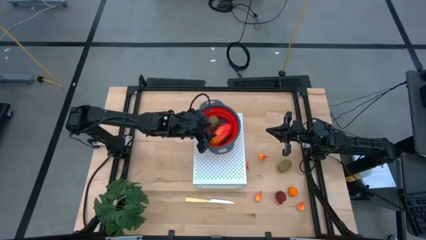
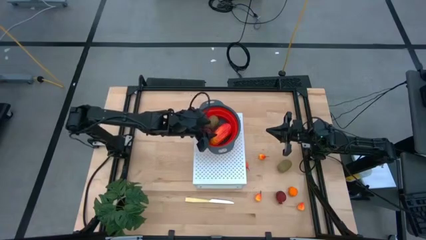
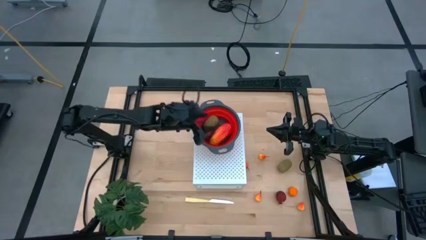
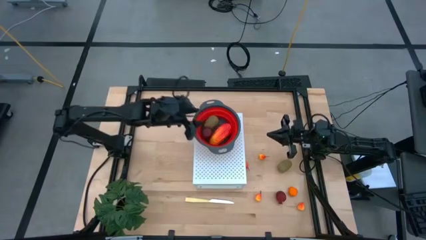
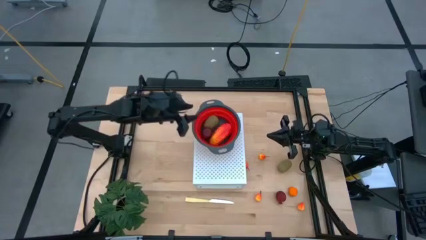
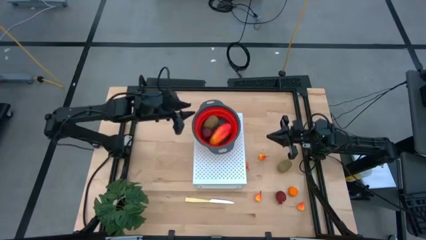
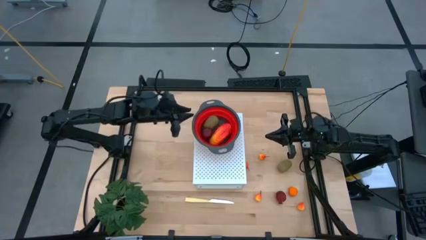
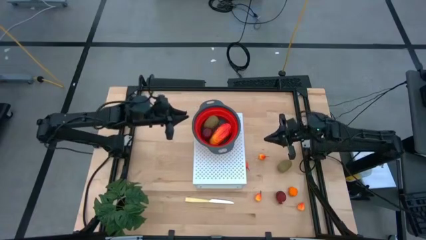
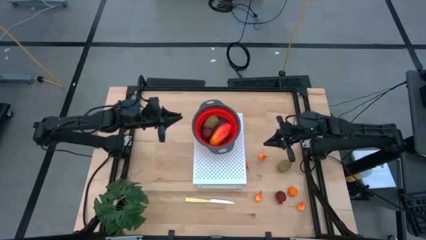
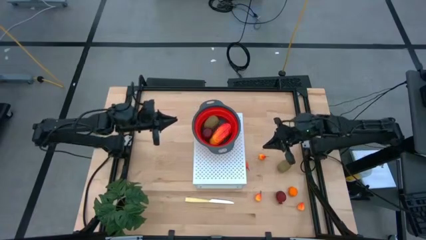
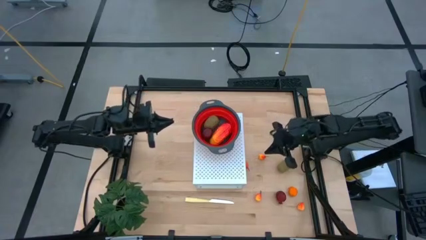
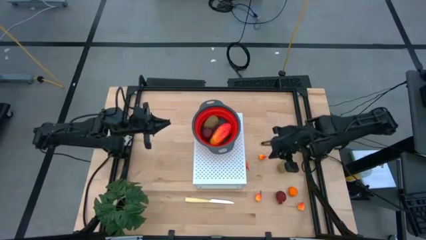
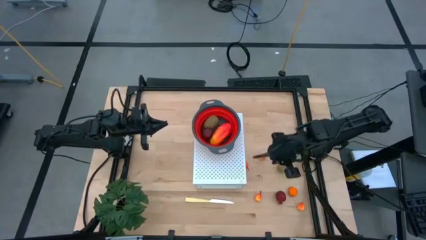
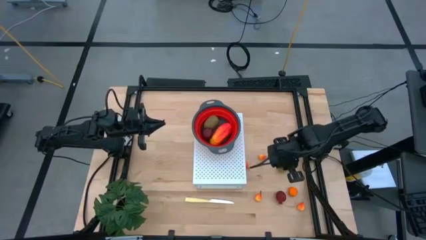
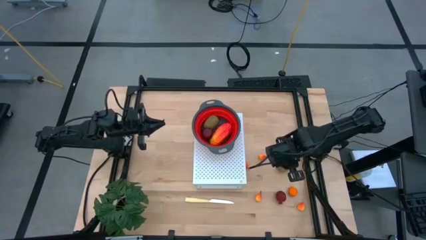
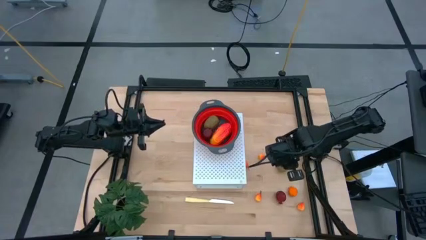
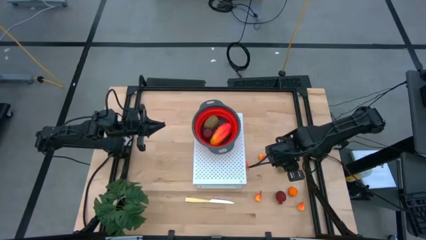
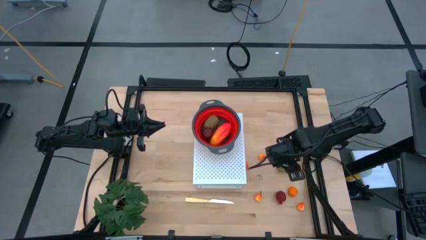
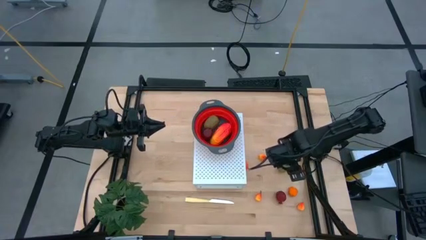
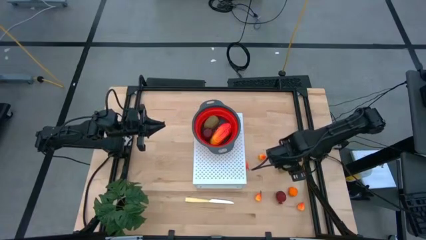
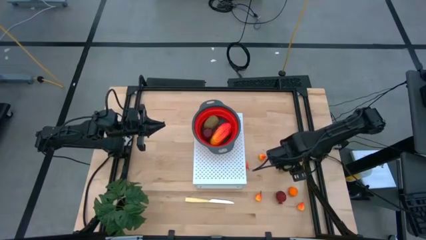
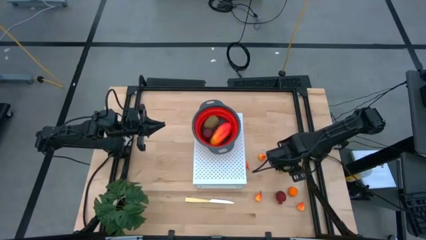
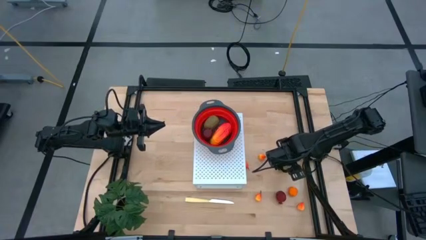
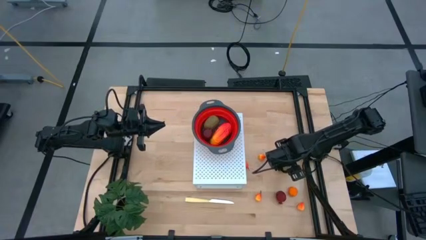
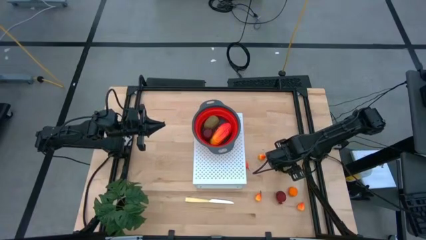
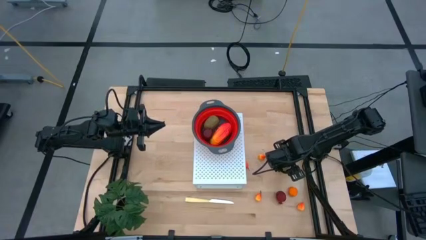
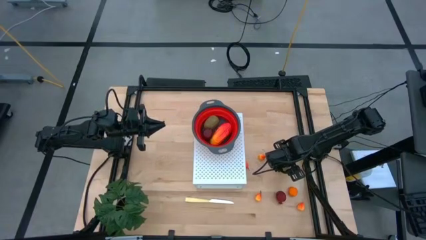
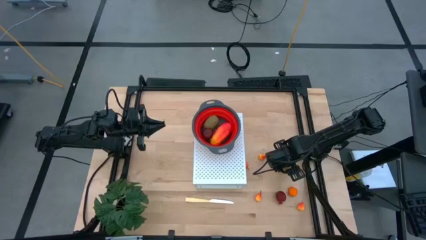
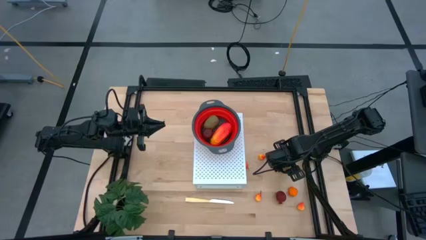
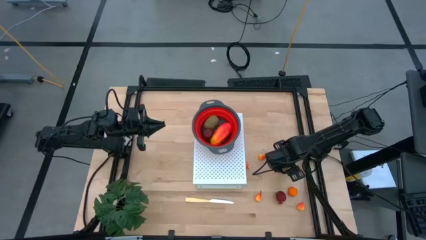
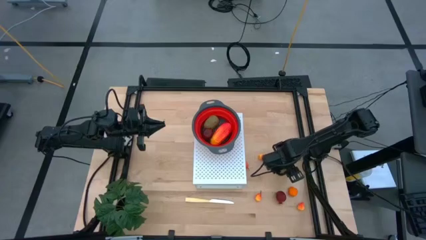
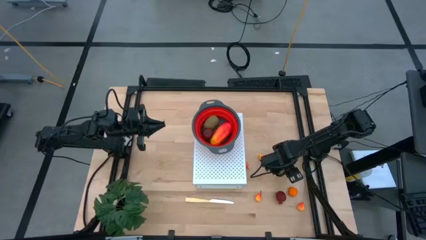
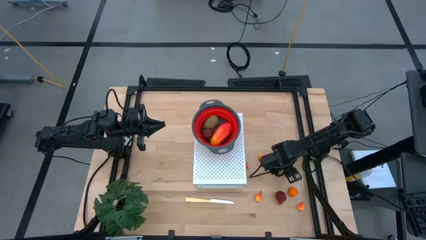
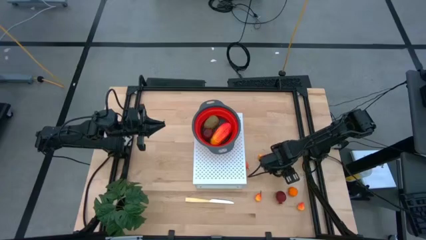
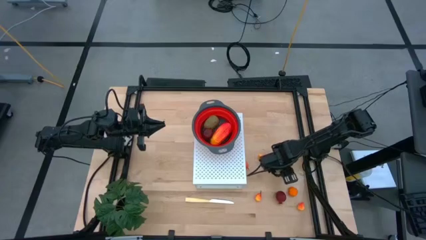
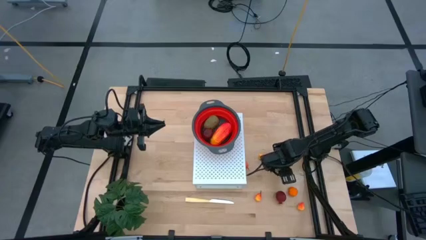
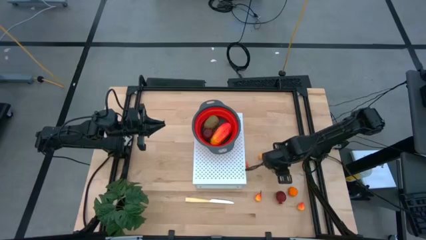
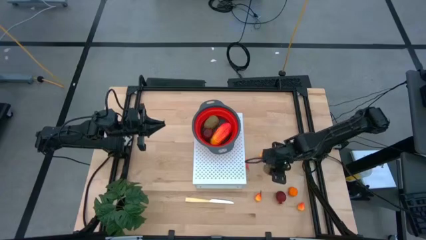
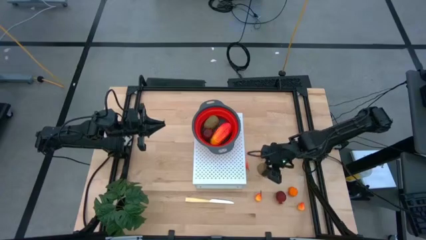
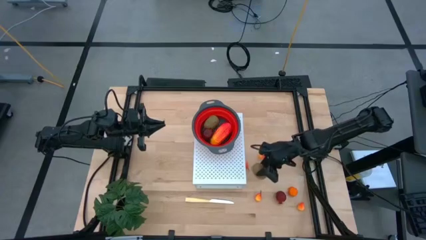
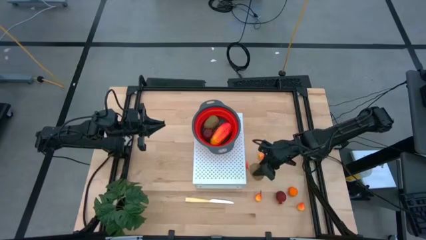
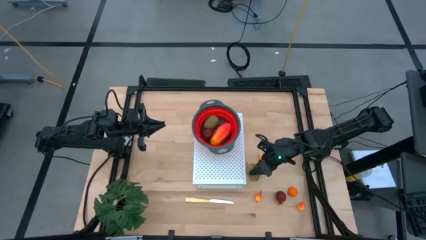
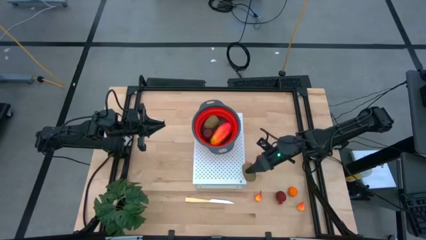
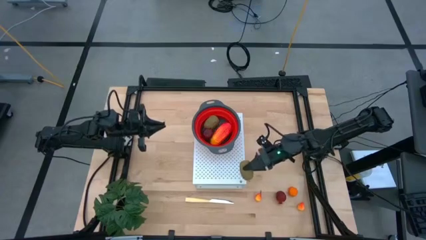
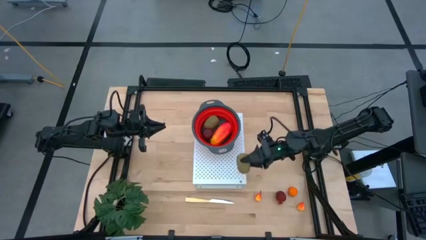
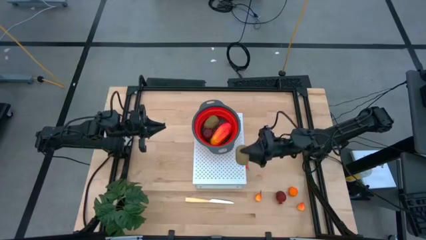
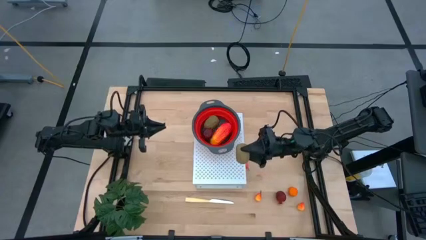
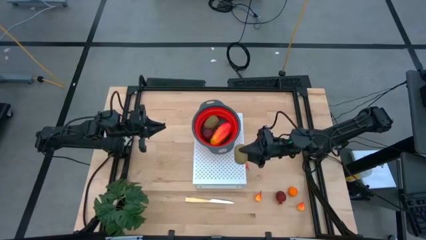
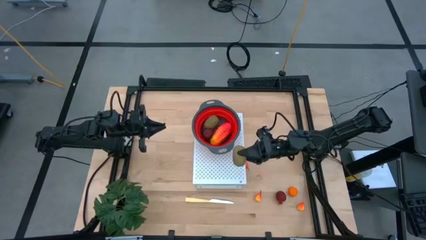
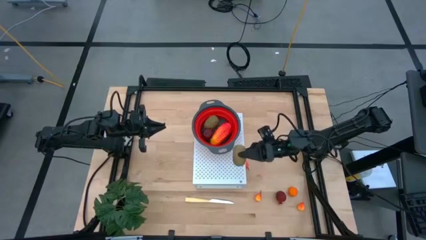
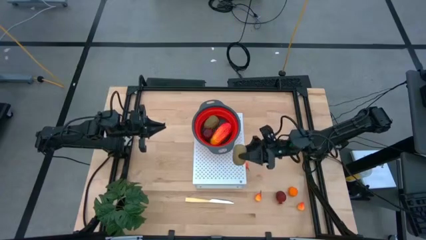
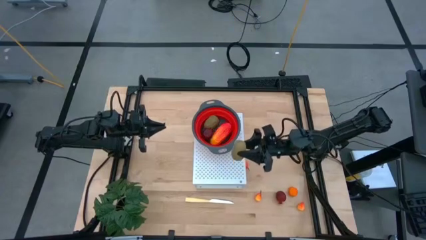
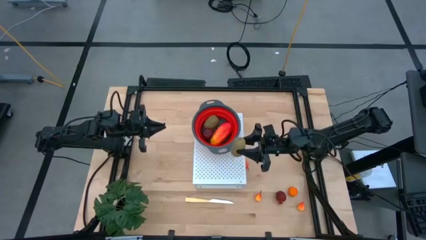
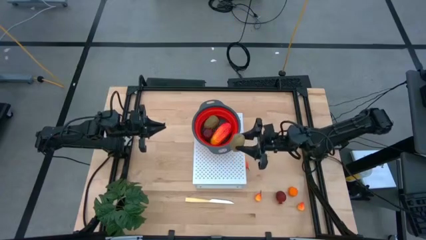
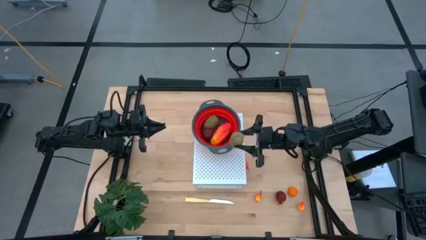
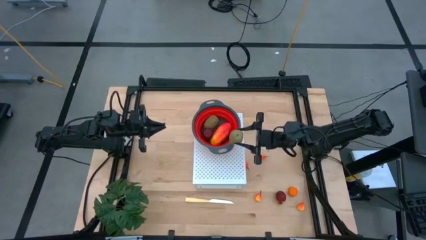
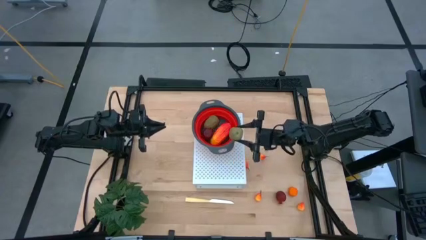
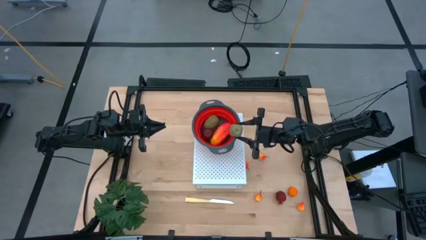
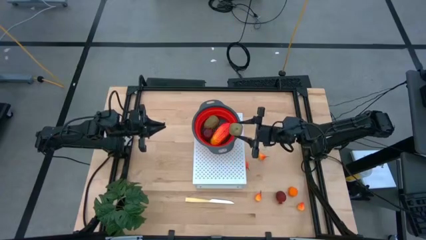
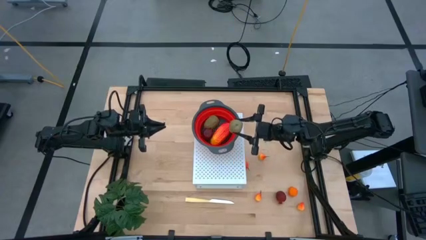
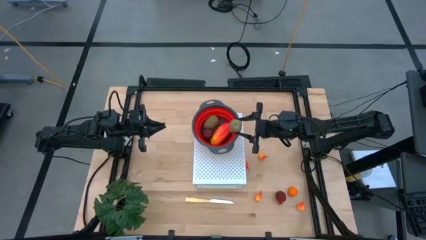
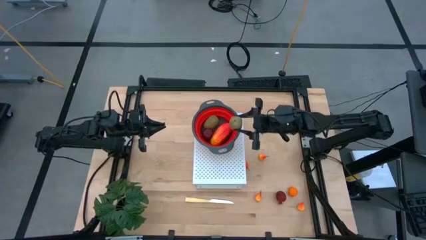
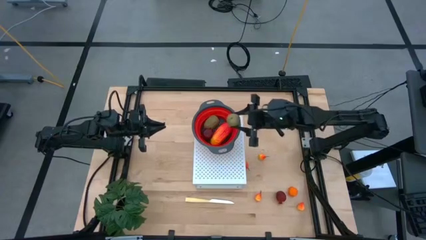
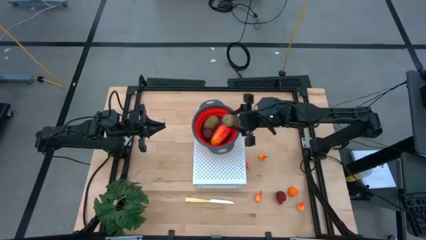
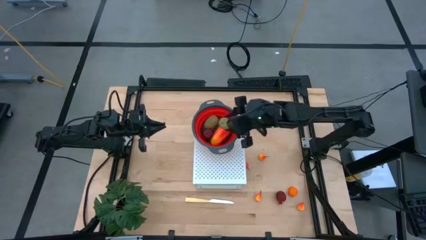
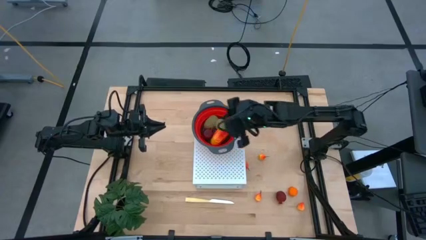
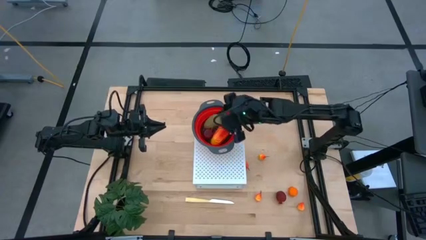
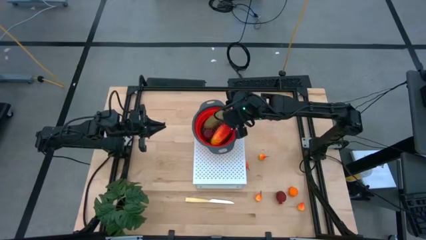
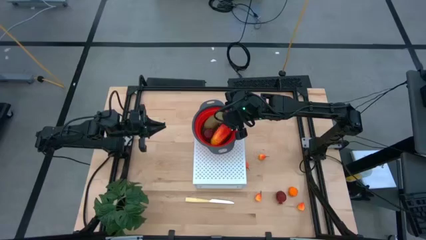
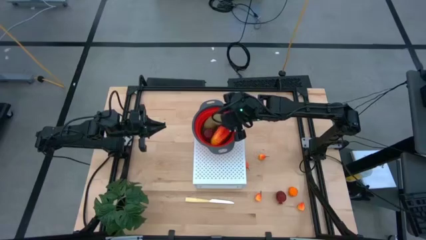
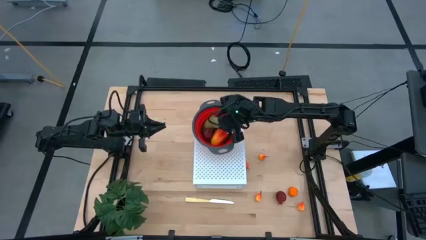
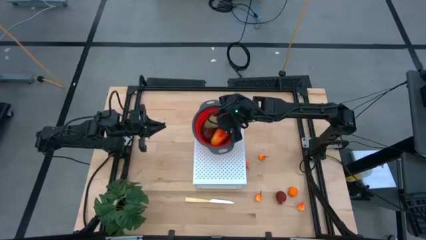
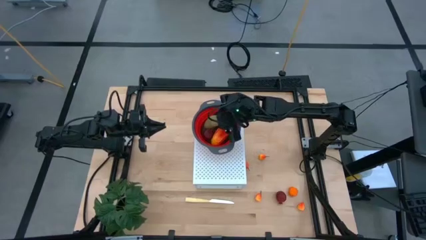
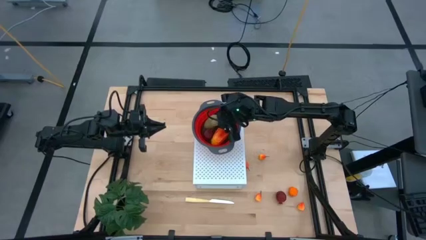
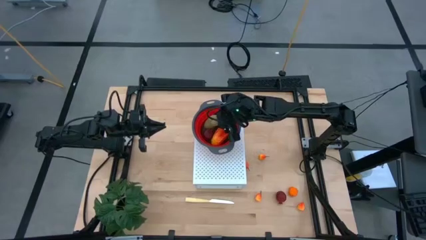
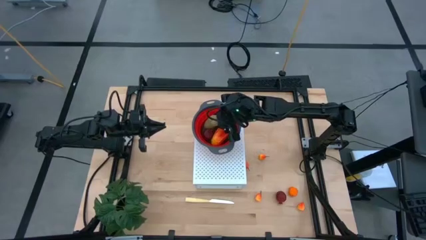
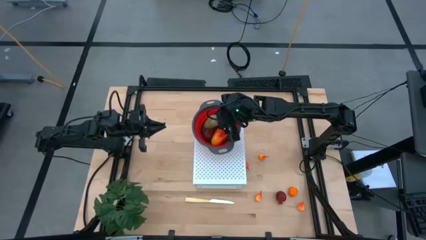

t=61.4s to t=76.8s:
Task: Pick & Place Fruit
Put the kiwi into the red strainer bowl on the shelf

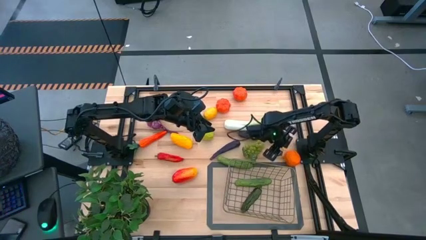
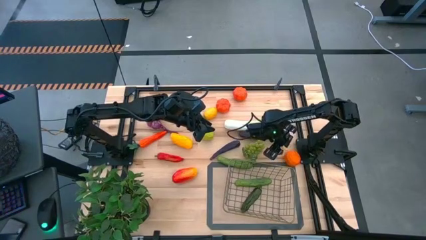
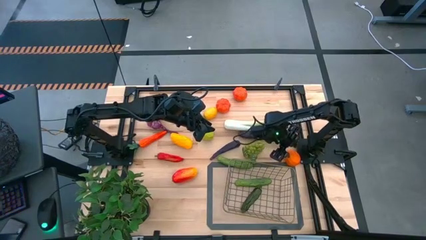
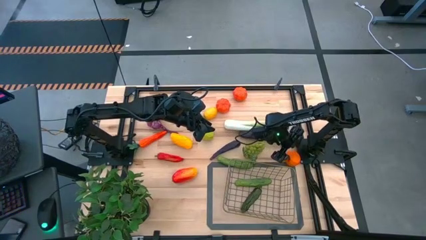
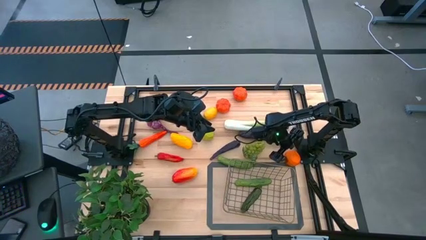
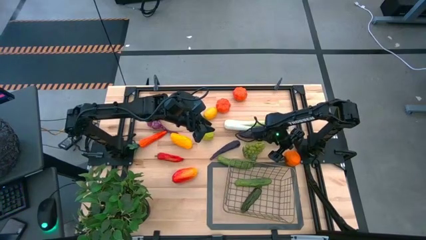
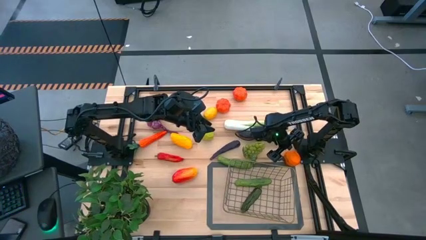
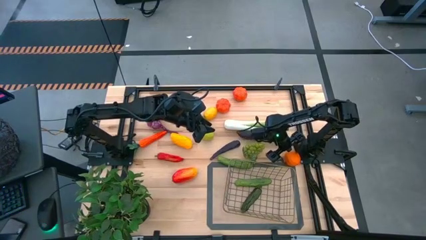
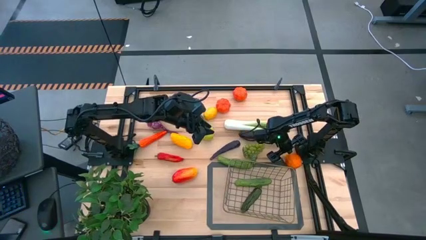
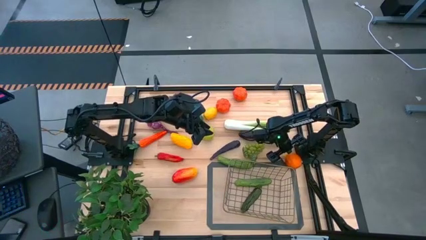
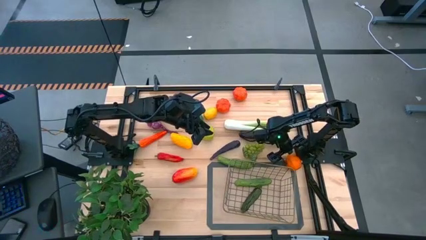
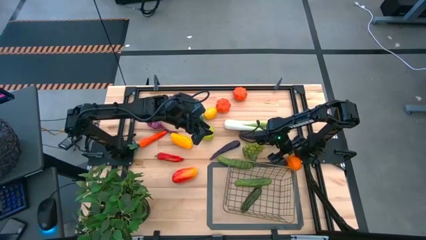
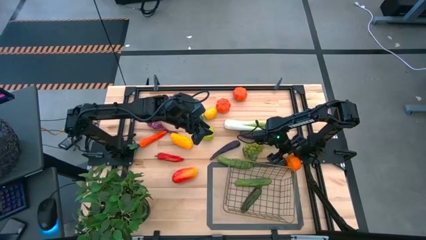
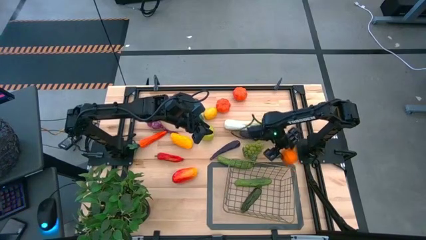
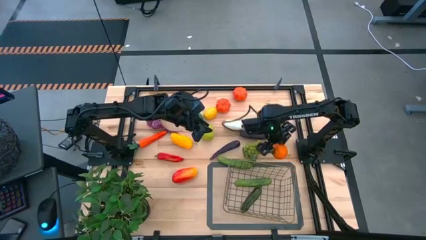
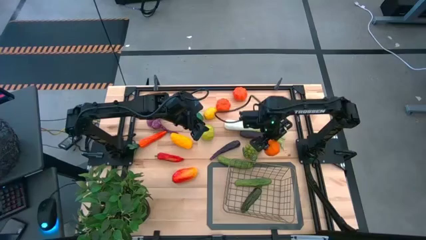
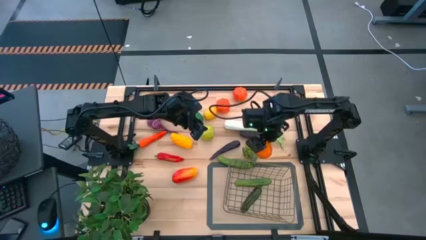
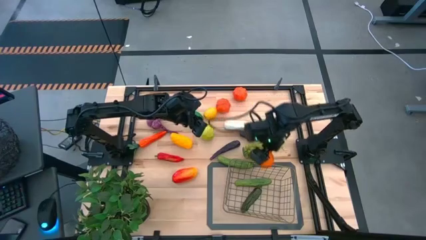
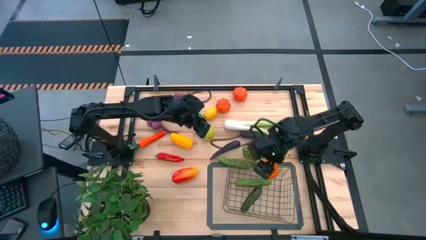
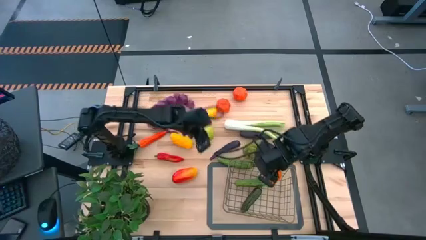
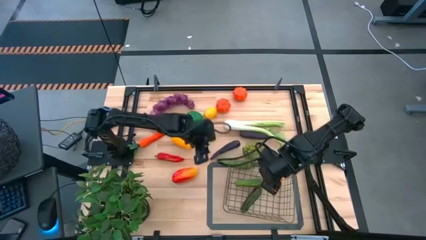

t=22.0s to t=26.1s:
Task: Build produce basket
Put the orange into the wire basket
